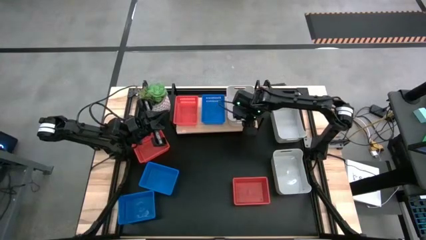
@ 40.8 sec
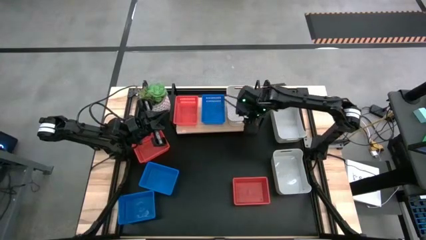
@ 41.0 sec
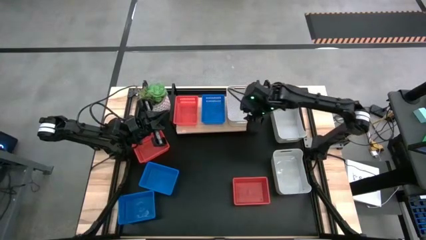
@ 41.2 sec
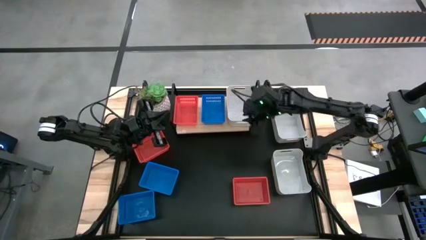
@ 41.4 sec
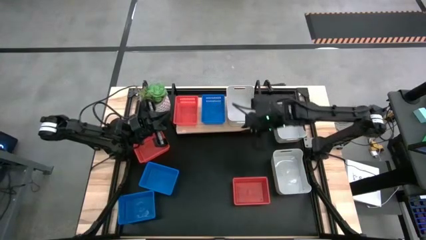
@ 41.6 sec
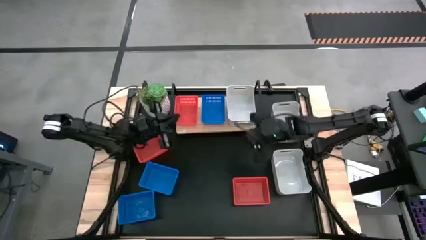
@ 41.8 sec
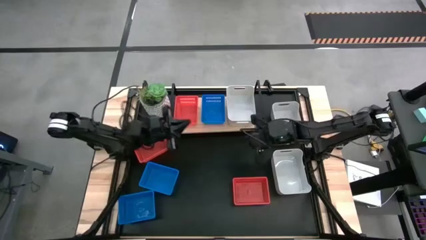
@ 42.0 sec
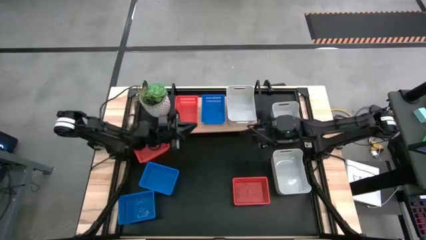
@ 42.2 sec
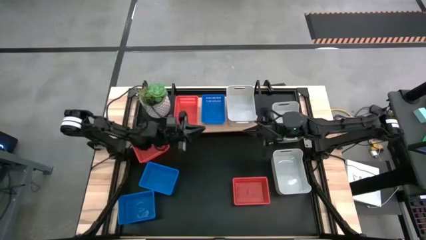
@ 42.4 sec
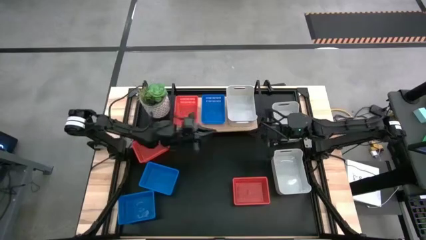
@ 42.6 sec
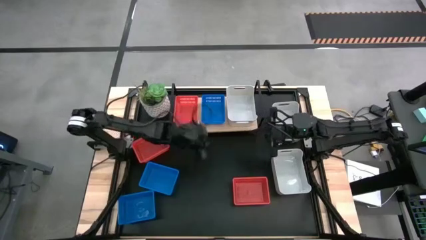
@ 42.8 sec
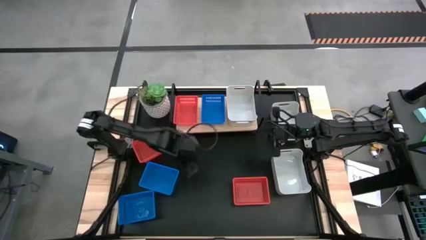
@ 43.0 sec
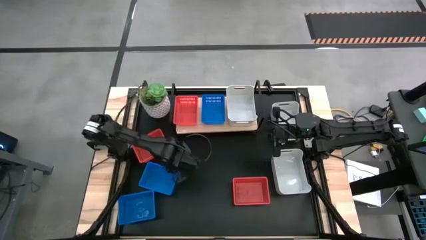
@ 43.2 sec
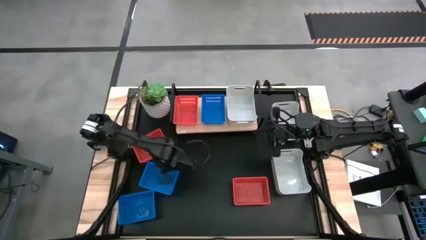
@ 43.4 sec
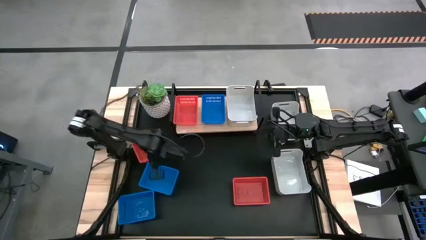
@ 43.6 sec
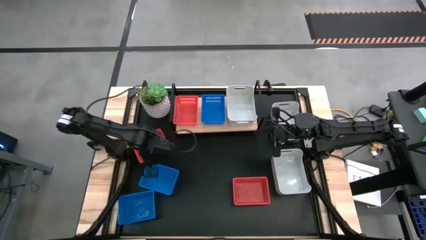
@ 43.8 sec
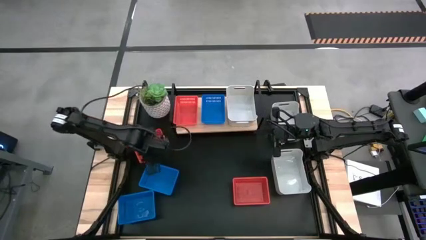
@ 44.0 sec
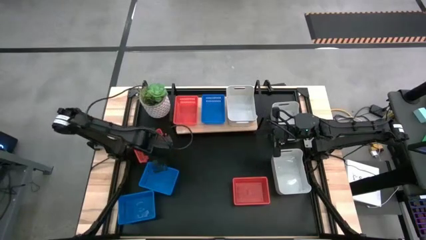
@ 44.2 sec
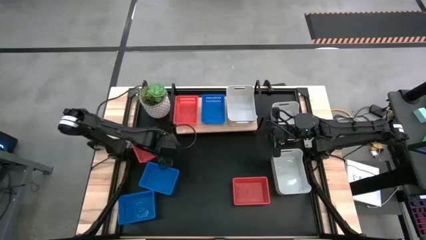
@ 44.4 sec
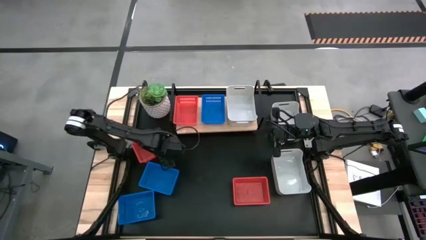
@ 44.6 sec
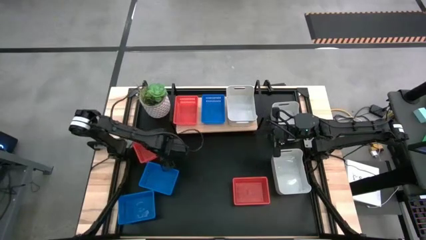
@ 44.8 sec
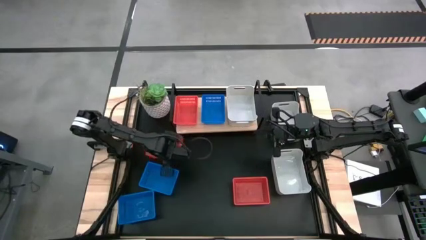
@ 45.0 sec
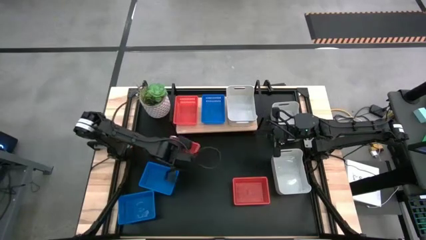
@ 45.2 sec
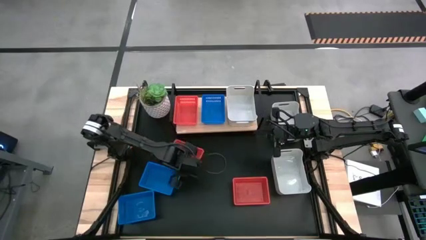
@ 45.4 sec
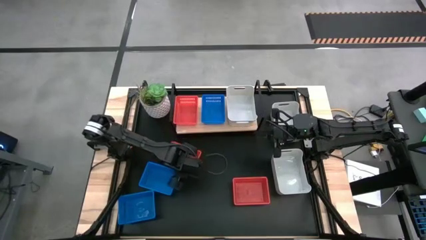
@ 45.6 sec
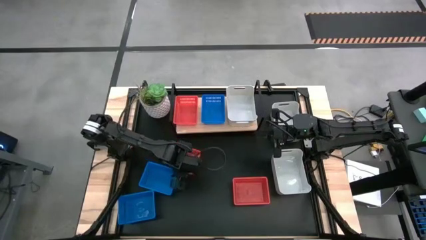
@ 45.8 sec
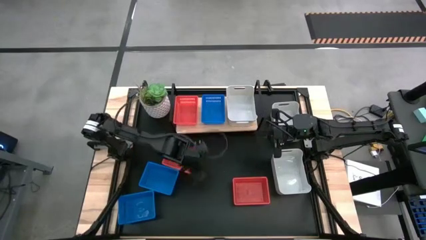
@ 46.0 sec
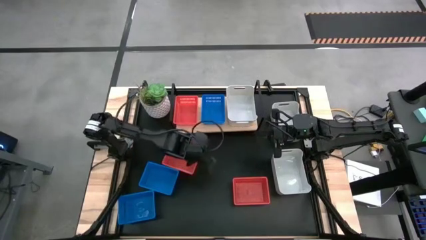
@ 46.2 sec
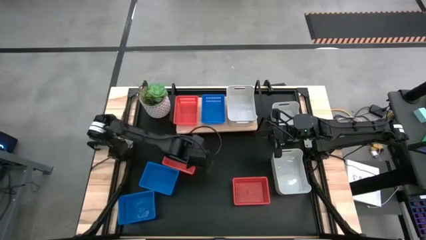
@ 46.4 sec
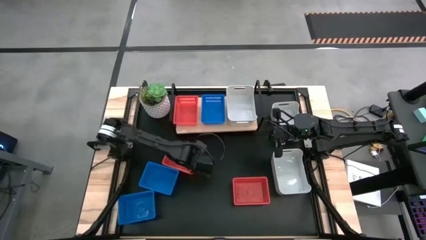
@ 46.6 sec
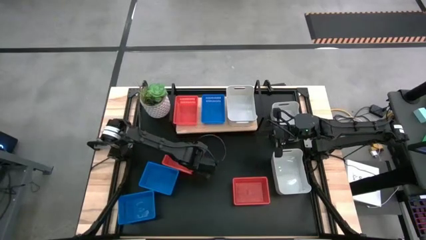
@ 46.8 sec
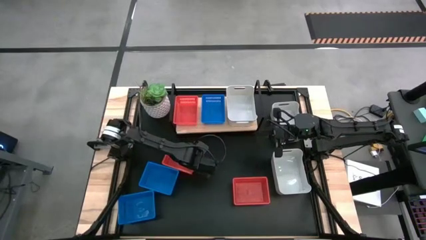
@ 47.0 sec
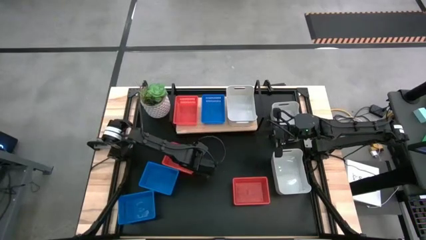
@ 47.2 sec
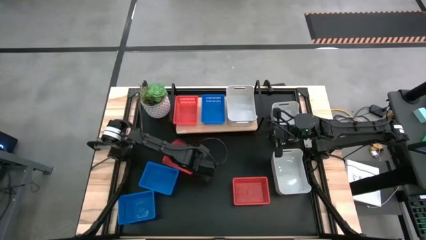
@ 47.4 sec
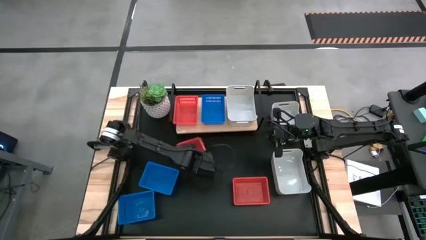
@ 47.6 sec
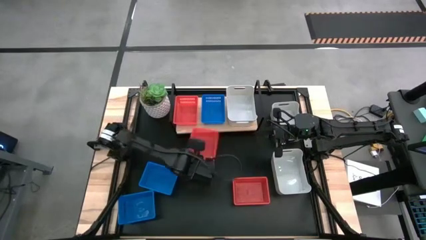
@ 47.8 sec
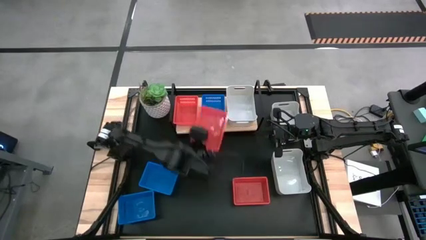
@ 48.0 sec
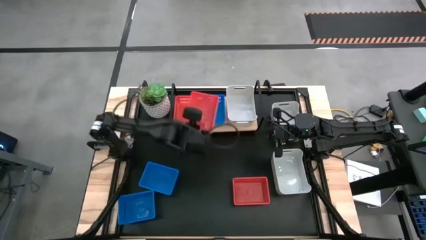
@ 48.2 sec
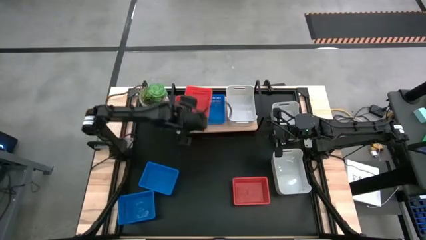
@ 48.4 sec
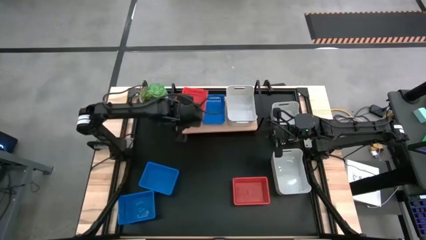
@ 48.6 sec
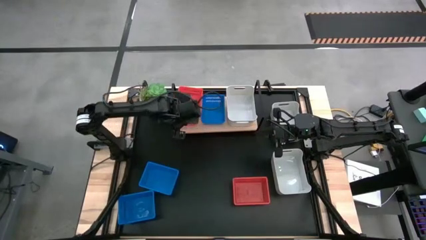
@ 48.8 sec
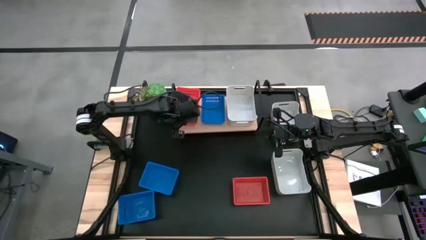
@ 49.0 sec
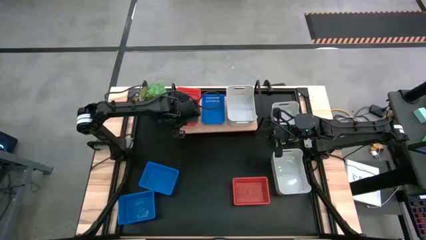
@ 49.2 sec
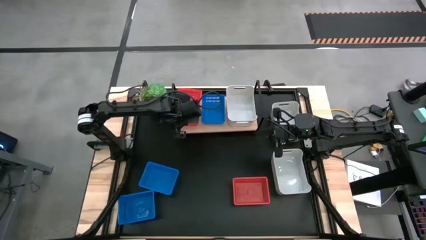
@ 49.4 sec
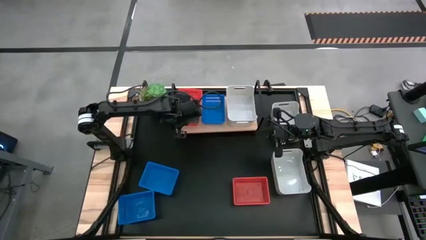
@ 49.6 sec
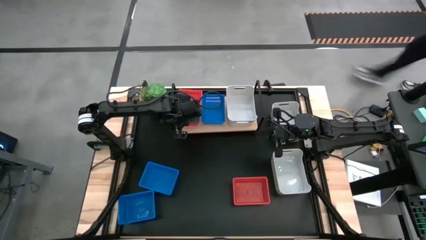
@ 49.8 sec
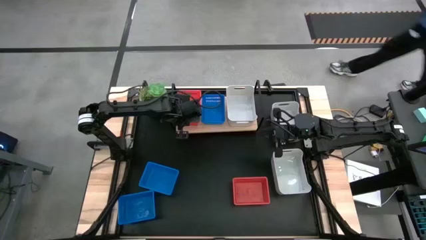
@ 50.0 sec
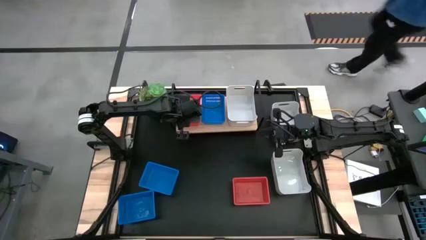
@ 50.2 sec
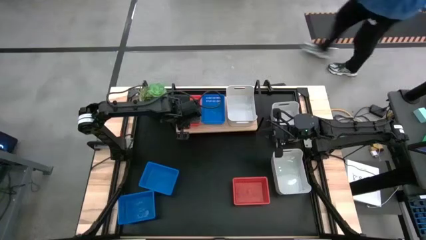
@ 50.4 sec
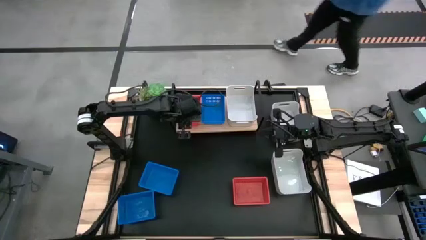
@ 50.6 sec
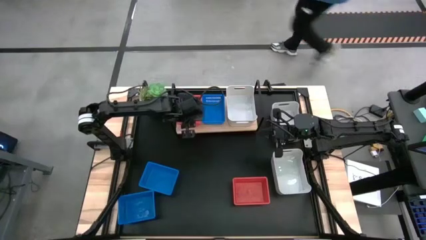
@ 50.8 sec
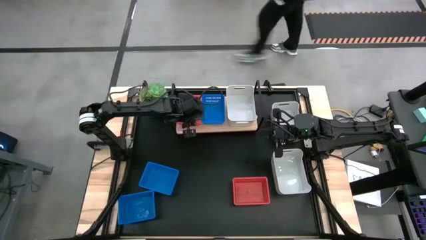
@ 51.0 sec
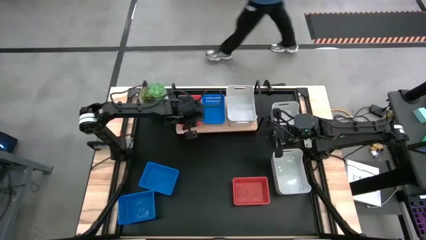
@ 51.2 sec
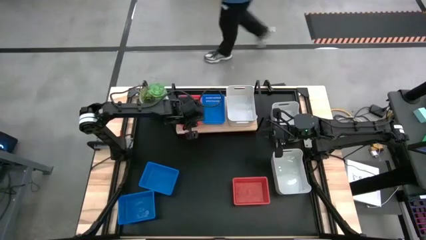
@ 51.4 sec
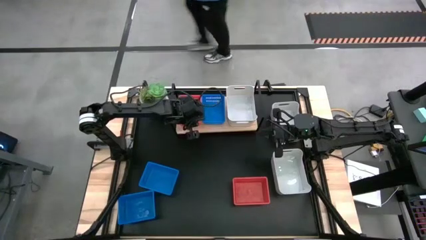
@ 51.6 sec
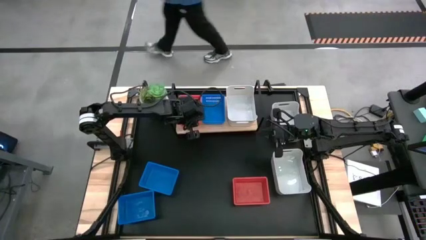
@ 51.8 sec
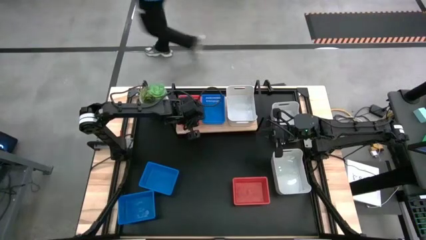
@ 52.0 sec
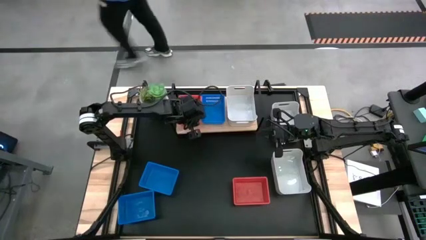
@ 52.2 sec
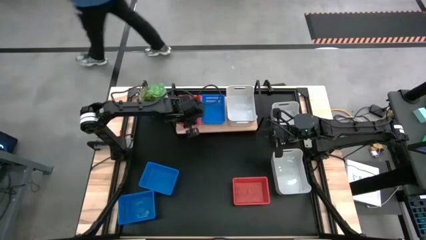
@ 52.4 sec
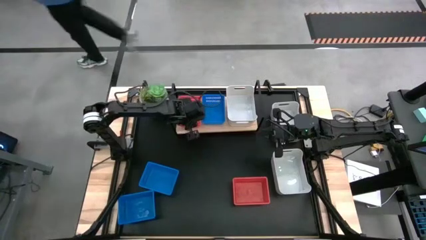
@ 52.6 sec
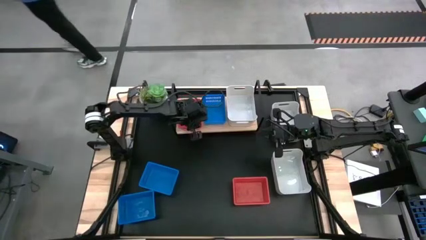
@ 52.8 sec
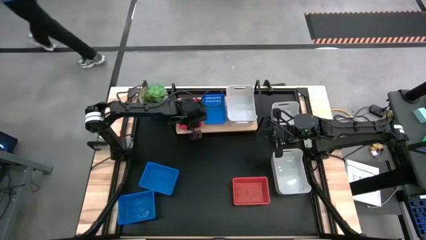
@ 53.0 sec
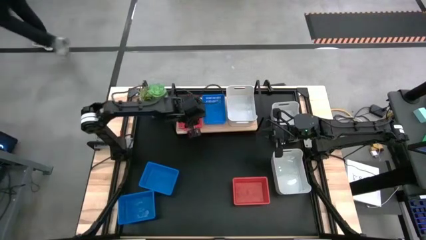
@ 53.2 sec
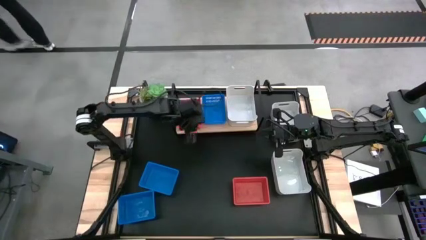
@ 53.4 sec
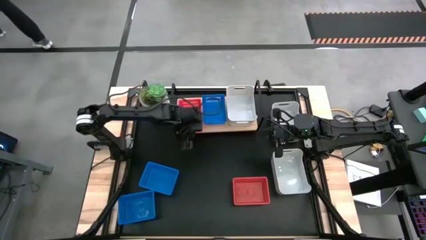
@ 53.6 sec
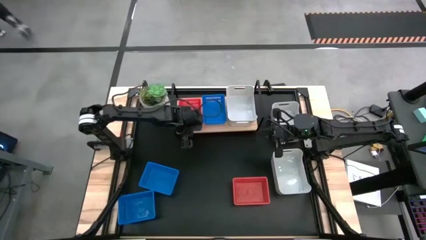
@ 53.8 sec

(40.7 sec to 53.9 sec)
Stack the top red basket on top of the red basket on the shelf
